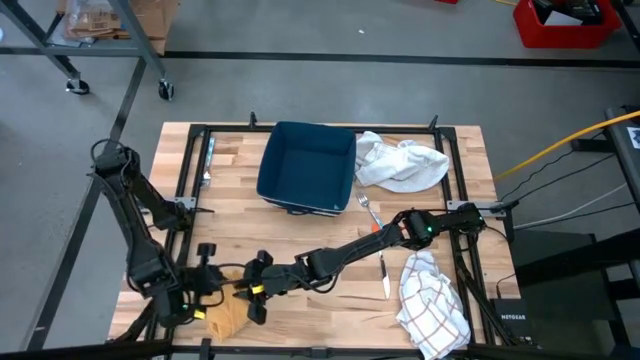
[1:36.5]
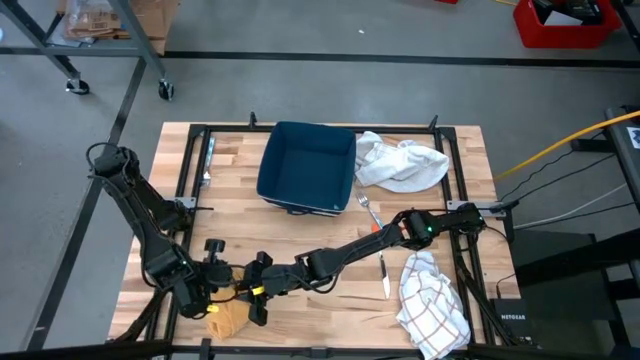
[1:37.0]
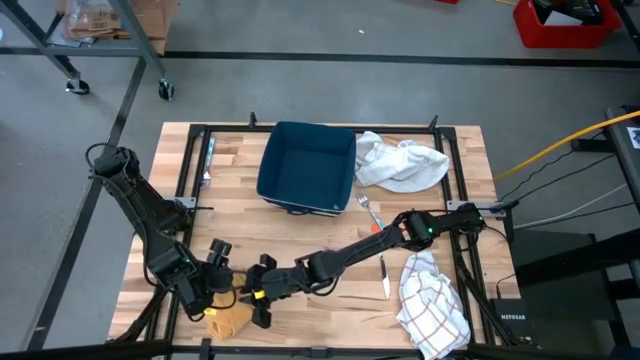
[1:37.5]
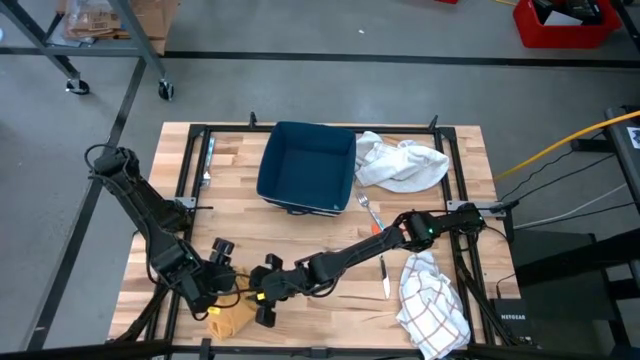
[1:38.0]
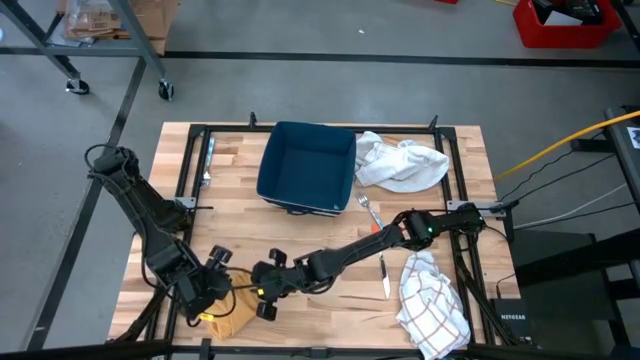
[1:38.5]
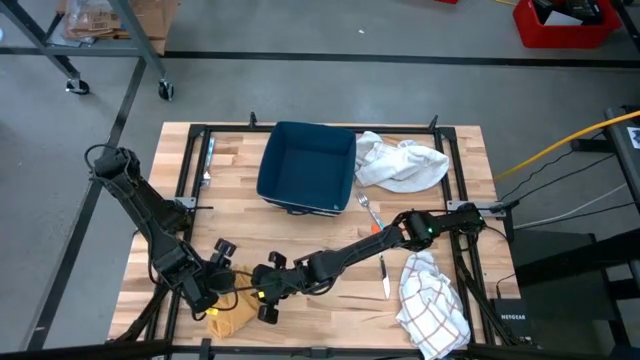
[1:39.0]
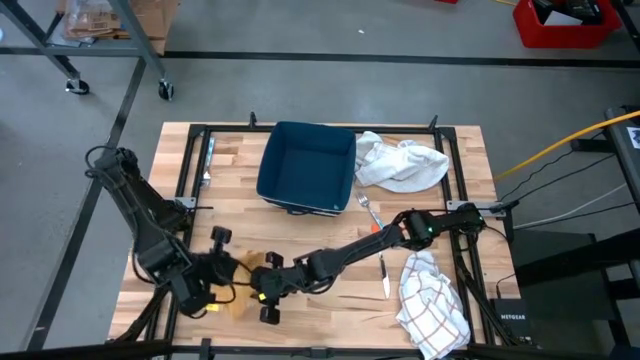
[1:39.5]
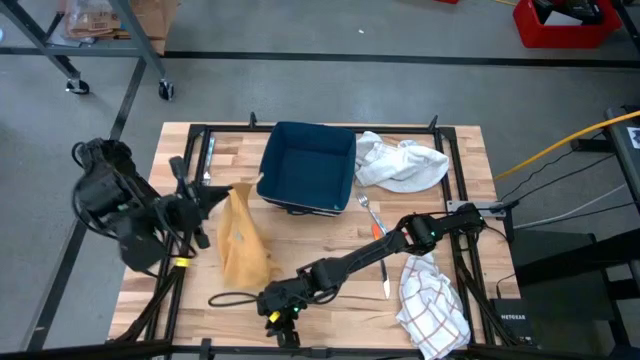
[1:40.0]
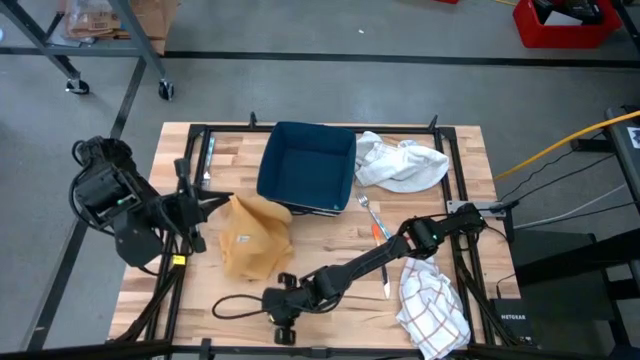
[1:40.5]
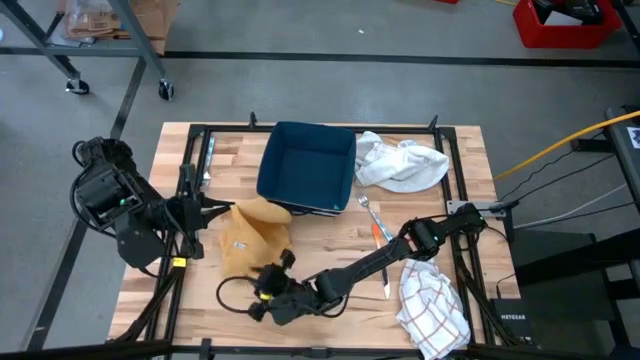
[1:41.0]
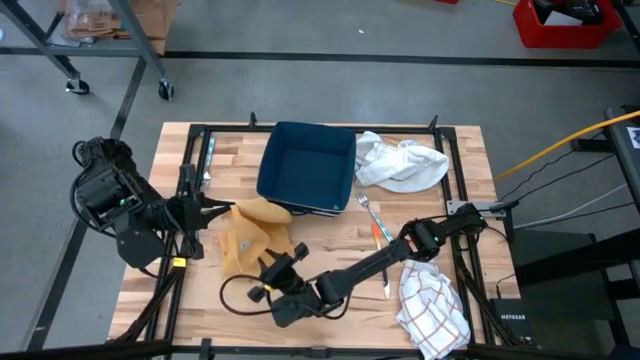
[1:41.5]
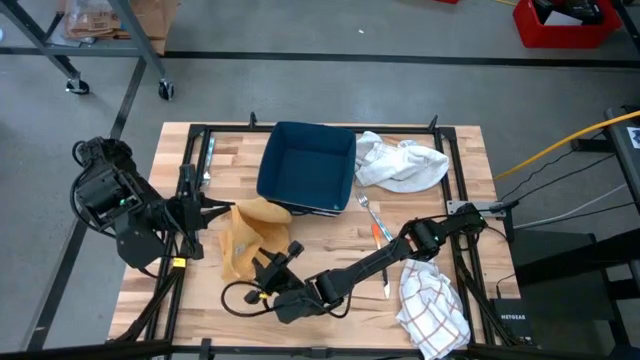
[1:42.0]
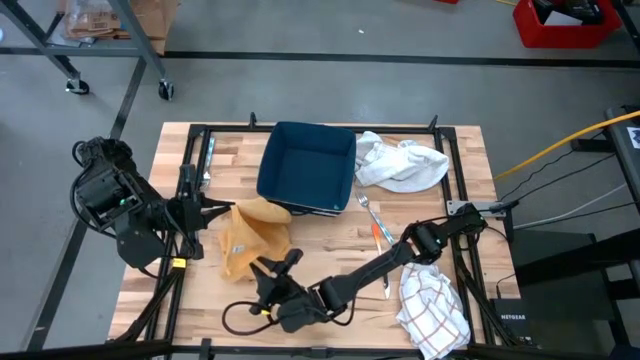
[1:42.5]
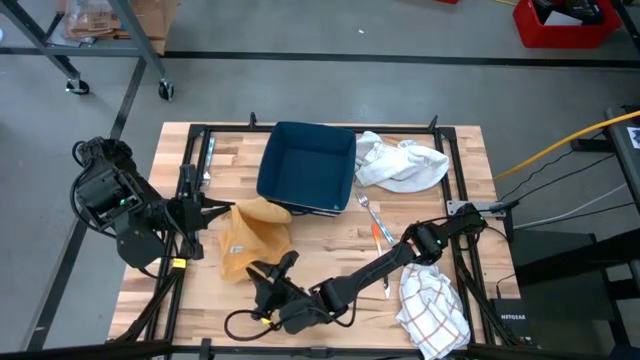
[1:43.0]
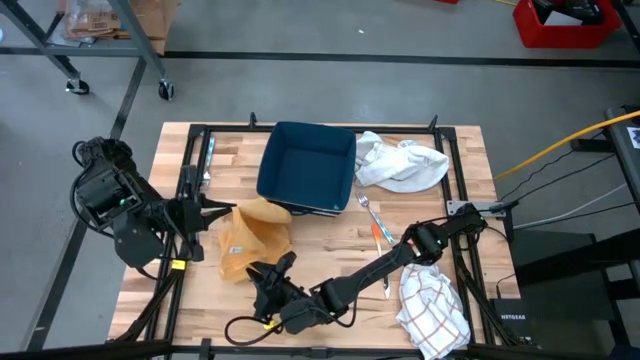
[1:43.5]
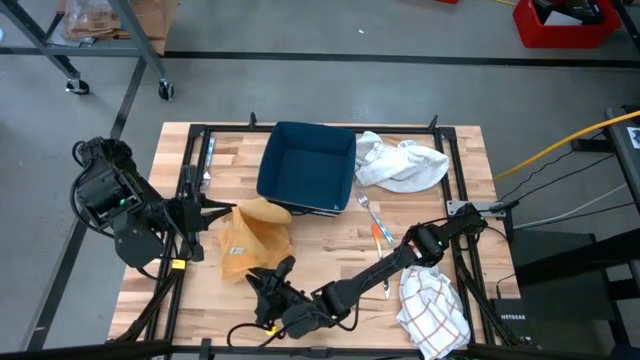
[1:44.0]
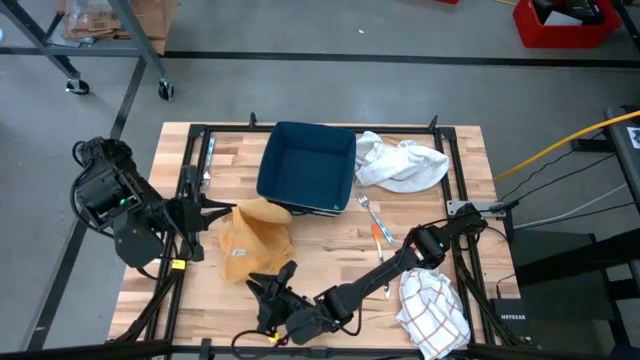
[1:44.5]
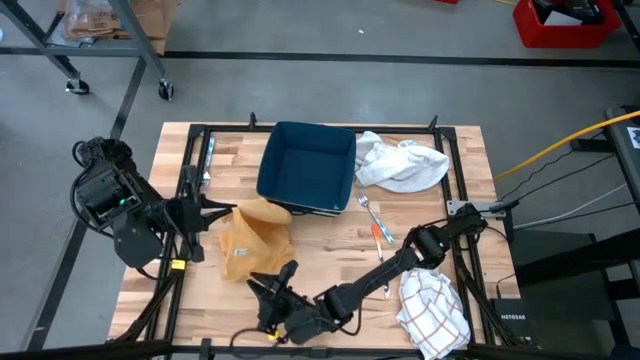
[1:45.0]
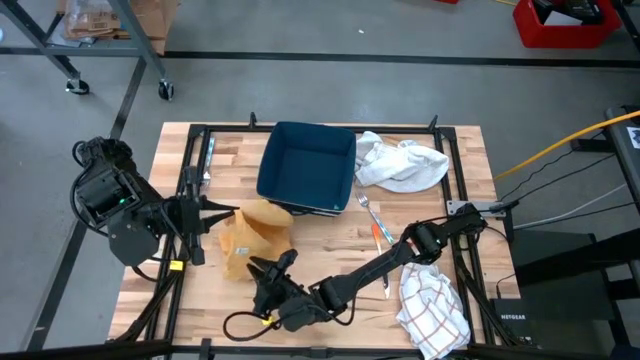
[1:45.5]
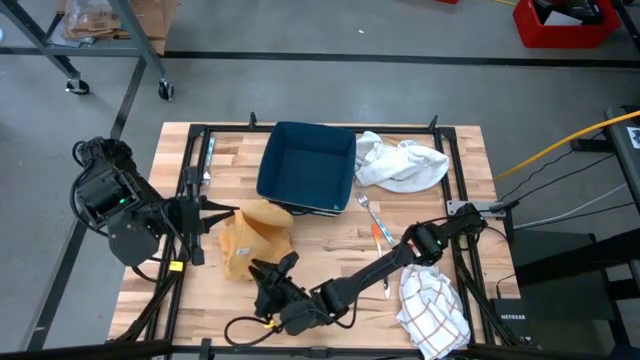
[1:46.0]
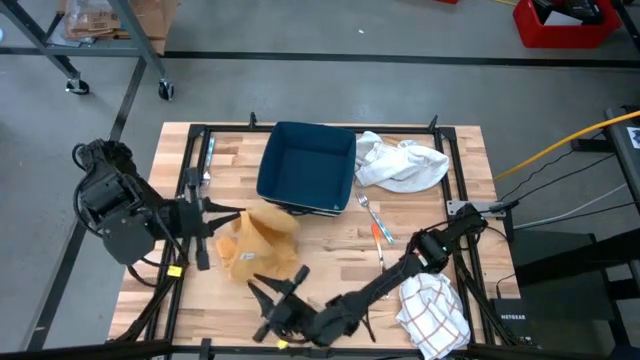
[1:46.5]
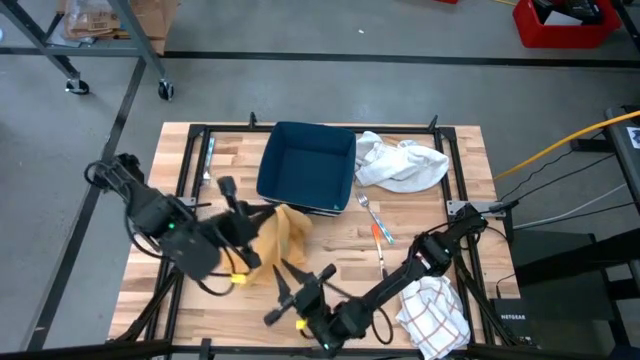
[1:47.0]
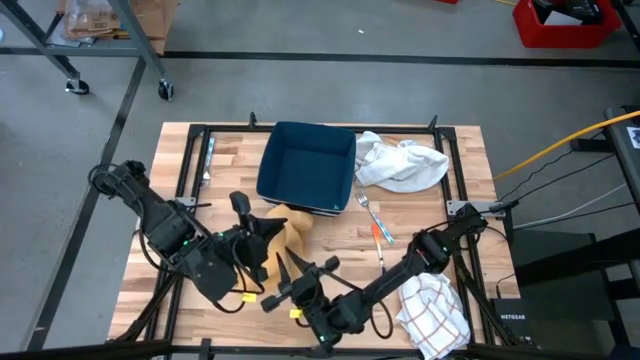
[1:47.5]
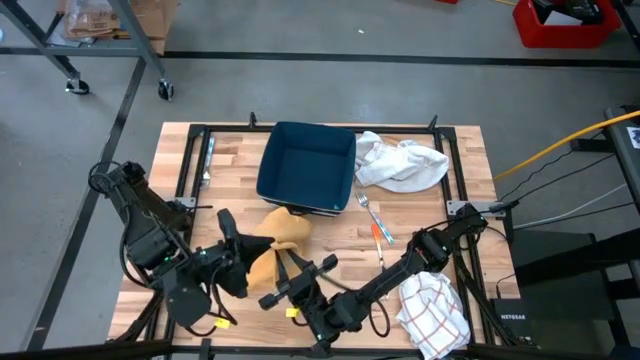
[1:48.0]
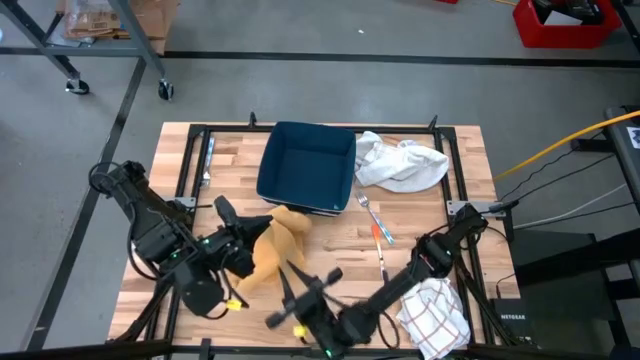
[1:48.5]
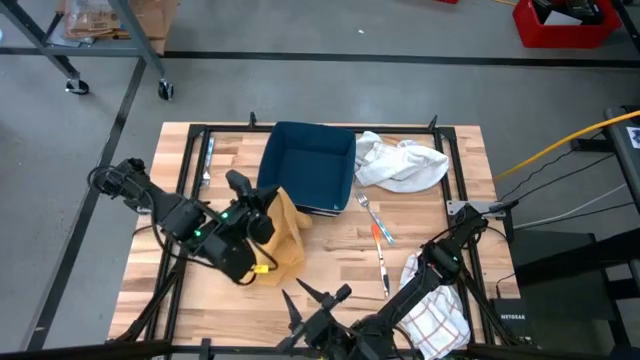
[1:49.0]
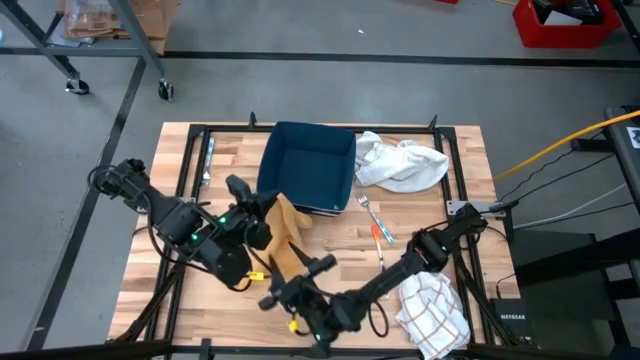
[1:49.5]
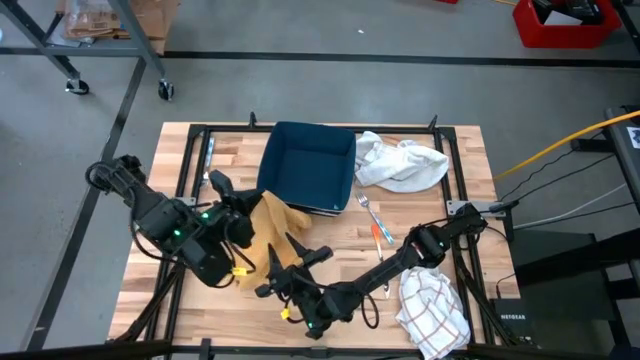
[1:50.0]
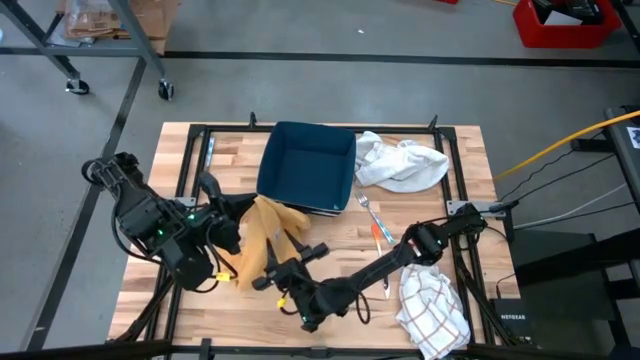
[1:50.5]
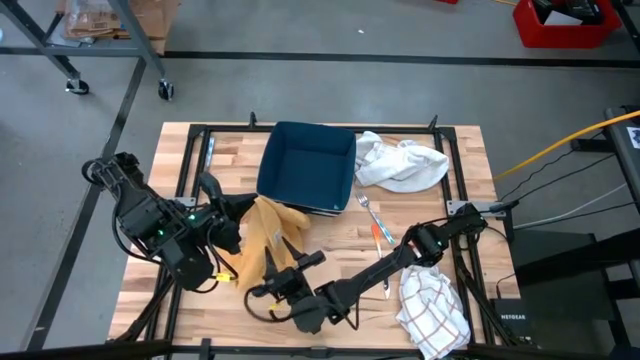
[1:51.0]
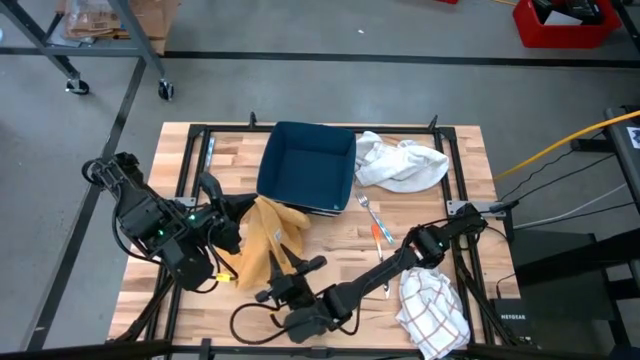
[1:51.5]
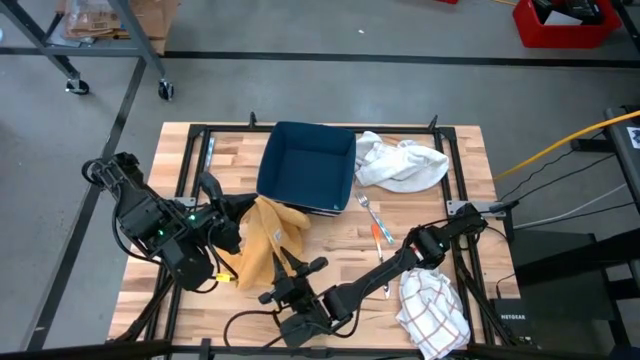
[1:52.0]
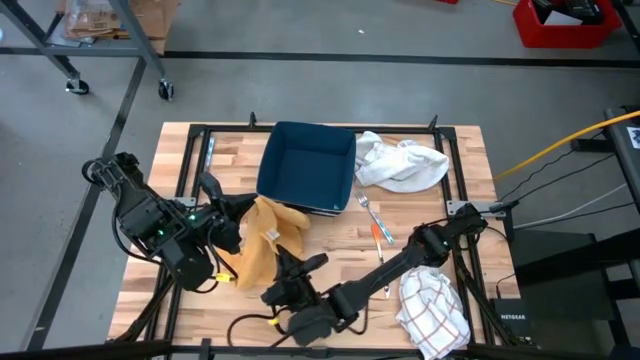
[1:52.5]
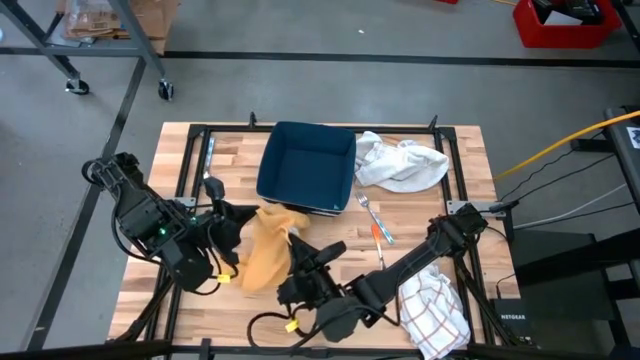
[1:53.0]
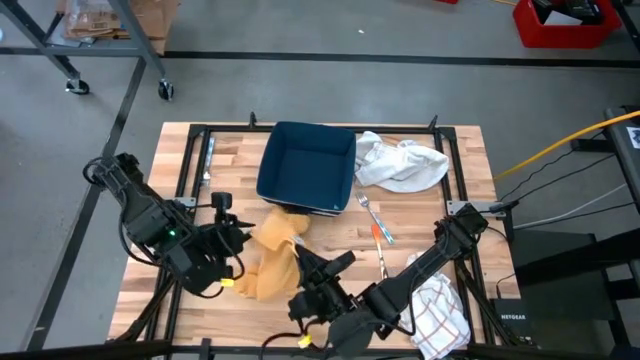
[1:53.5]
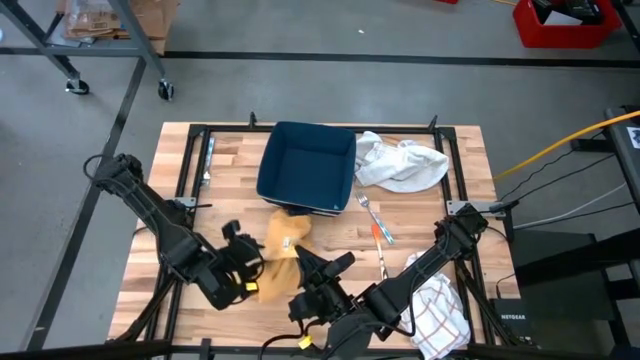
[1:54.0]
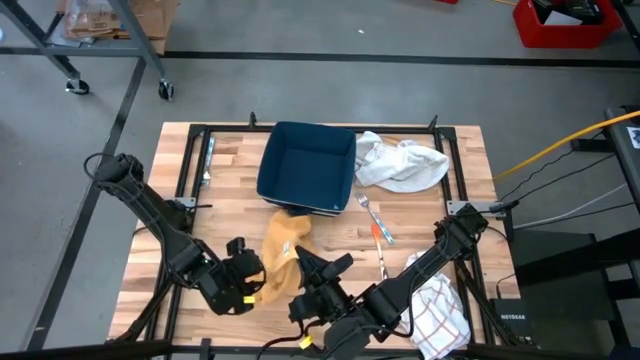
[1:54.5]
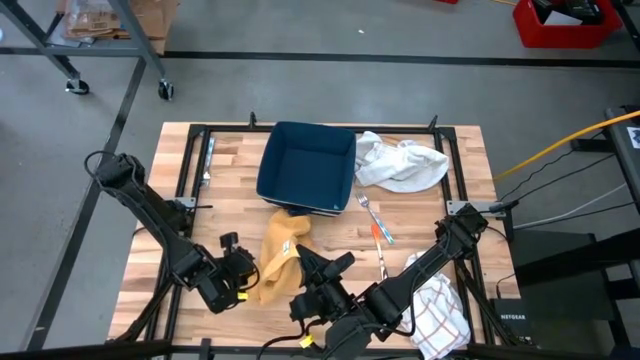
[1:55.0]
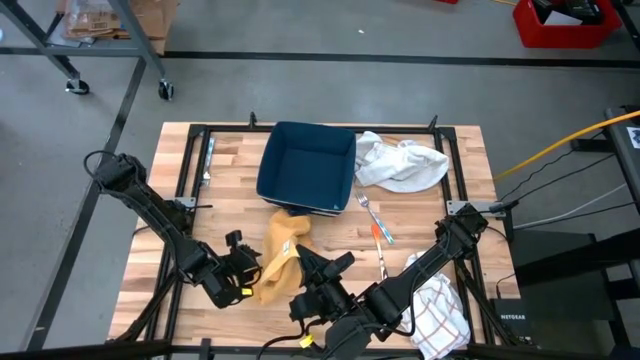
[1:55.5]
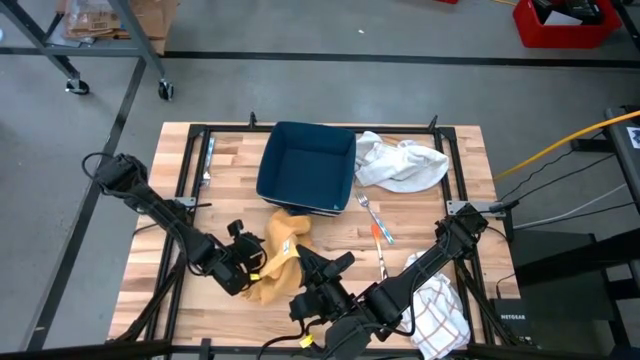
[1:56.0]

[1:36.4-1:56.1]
Task: Fold towel
Fold the yellow towel

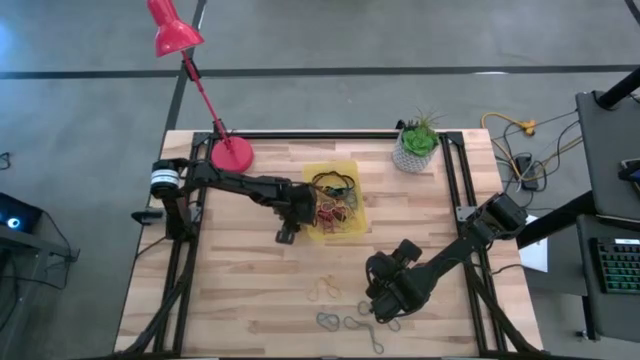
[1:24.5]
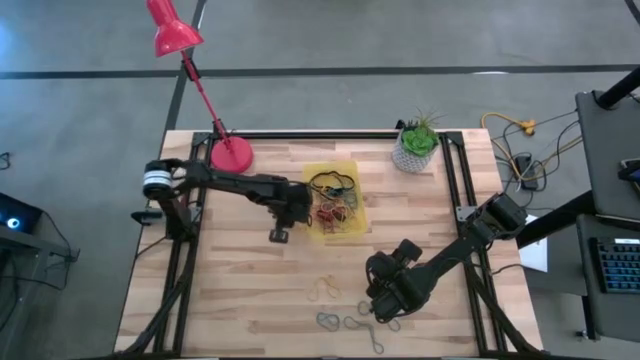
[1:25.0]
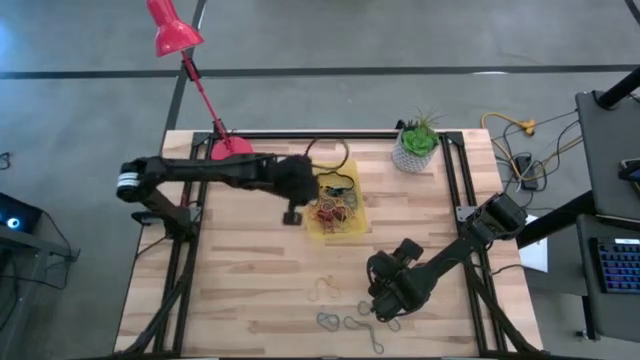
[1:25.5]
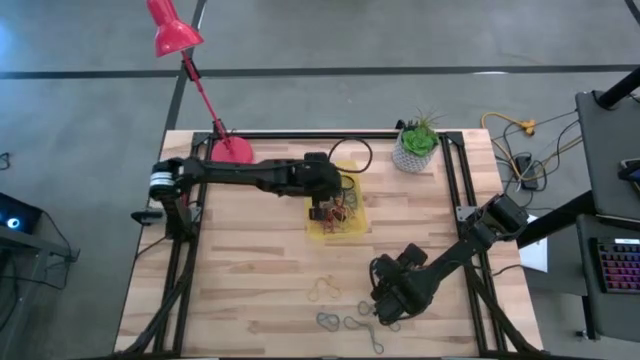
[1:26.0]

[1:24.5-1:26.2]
Task: Pick and place rubber bands into bin
Put the yellow rubber band into the yellow bin
